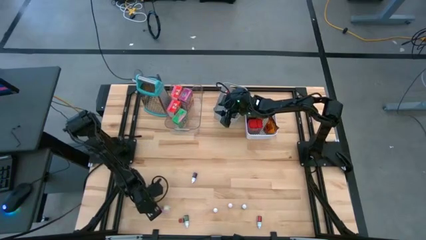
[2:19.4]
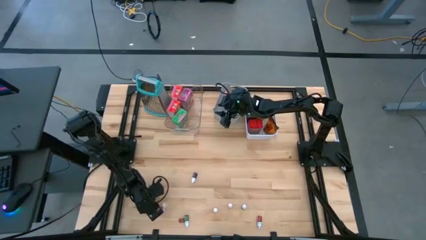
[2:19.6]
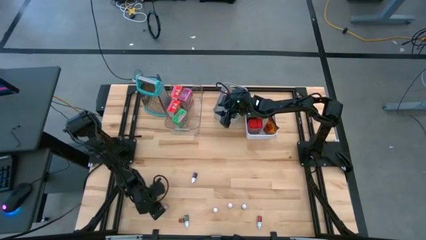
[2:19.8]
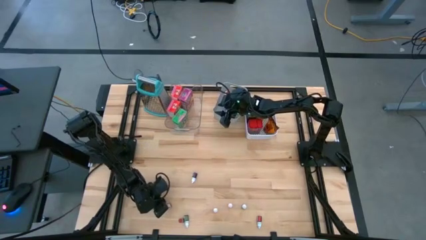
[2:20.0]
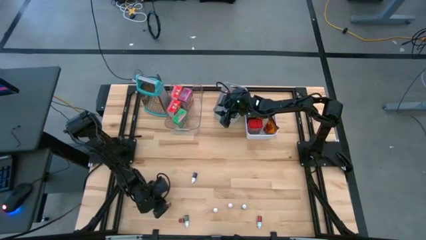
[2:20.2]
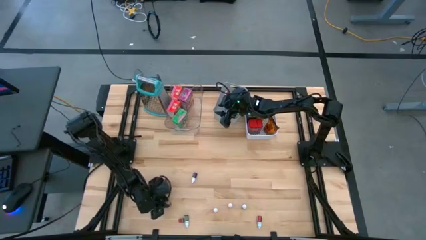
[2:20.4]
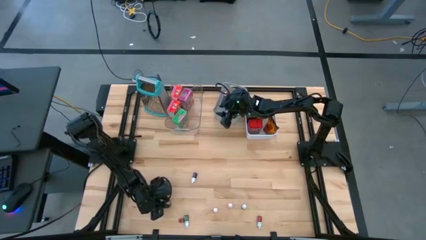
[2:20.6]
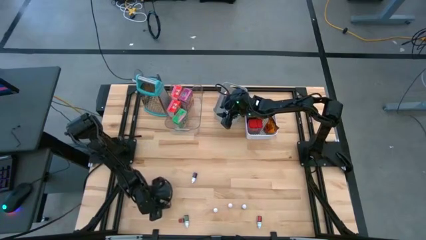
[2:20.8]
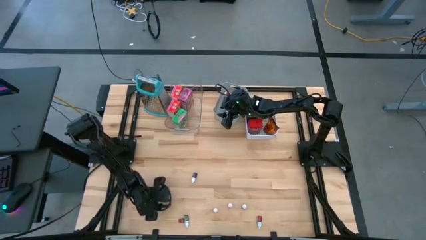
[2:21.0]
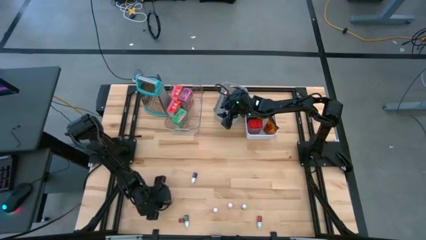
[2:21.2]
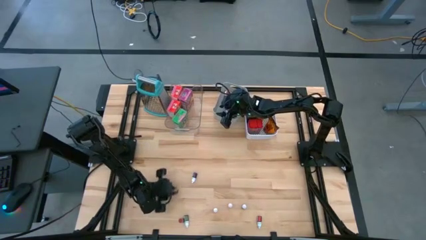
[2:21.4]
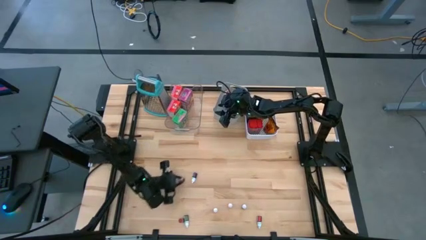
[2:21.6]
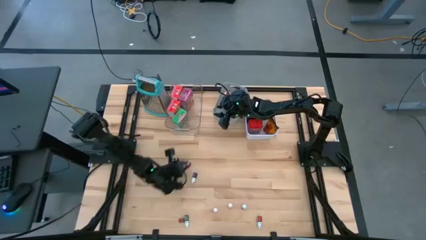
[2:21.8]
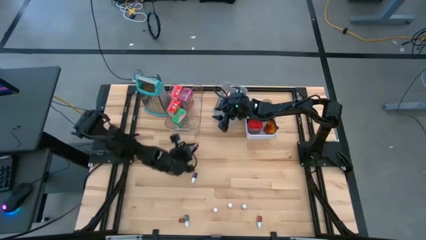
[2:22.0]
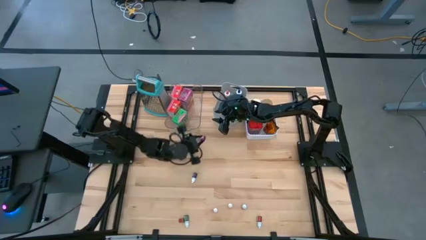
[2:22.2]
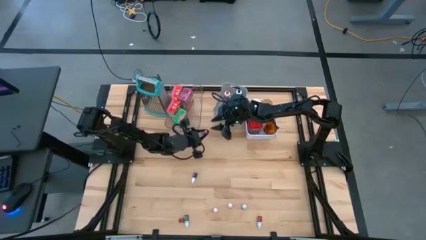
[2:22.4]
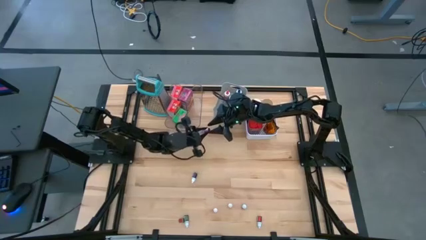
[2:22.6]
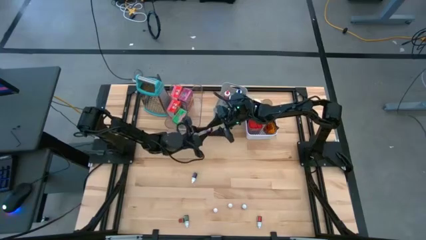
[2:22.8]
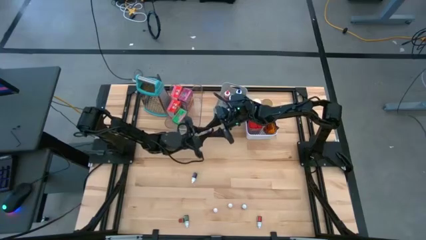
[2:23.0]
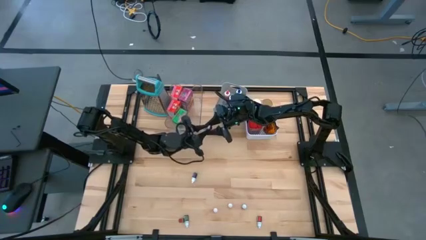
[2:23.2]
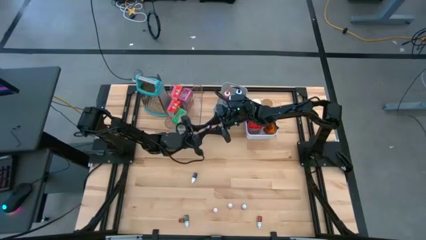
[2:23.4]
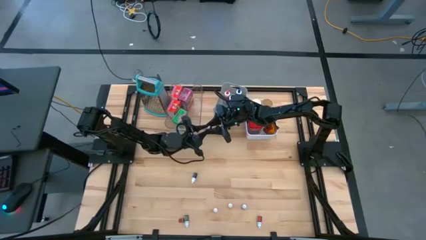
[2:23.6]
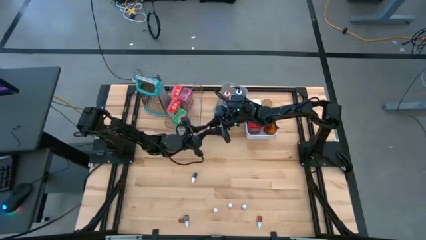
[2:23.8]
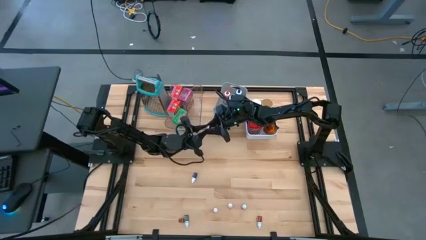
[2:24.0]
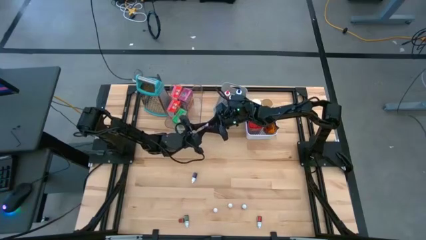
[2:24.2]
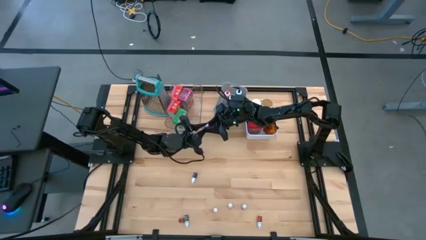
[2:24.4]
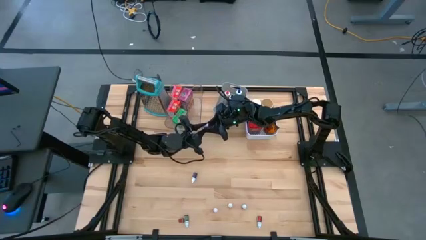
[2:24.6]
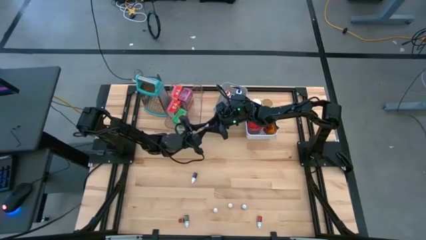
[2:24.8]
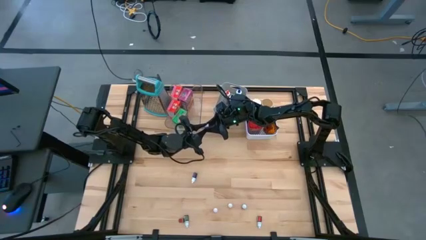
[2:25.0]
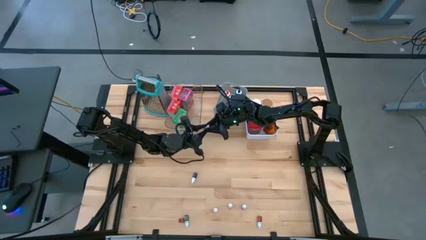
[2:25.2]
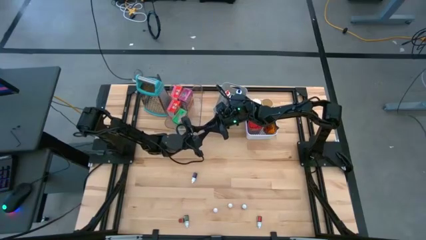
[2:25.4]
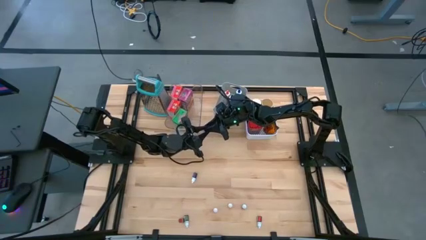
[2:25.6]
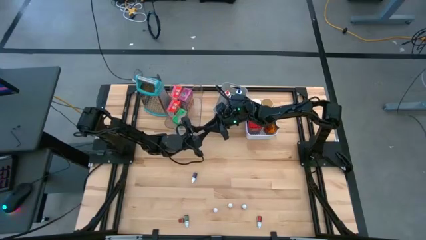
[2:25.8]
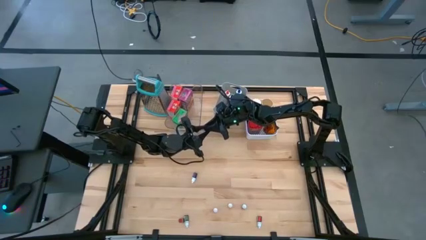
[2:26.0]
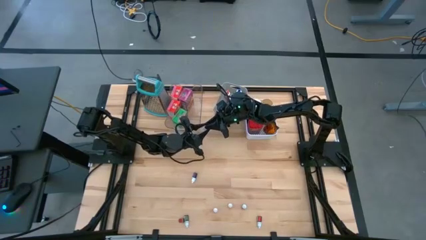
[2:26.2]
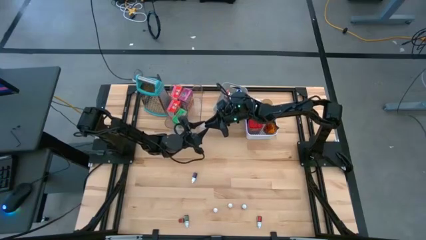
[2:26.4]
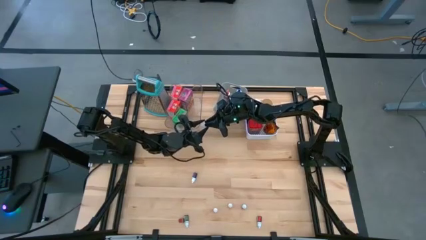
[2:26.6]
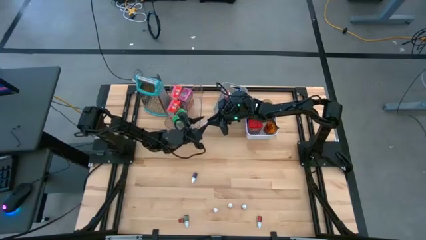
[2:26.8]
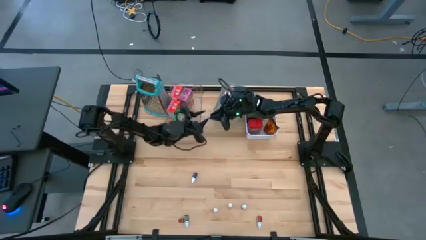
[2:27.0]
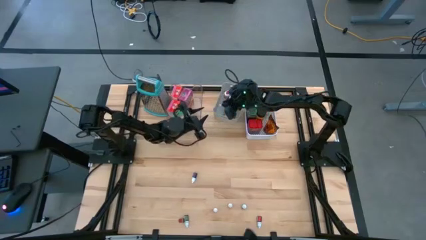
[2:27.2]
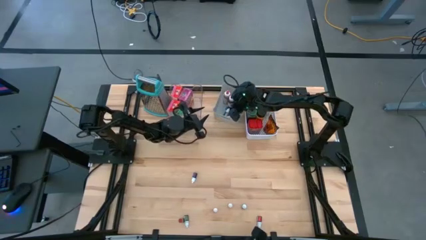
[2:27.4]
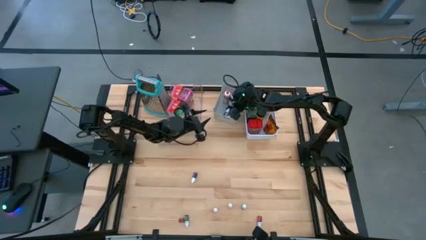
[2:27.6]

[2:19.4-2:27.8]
Task: Pick & Place Kitchen Items
Put the small pink food coloring bottle into the gray bin

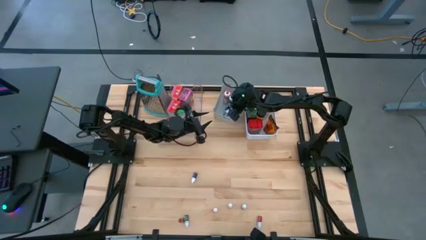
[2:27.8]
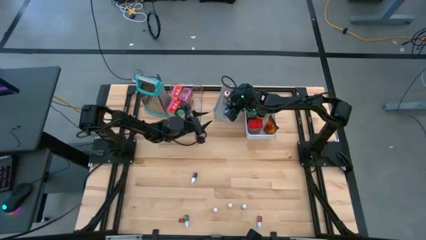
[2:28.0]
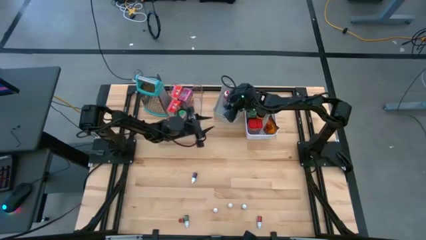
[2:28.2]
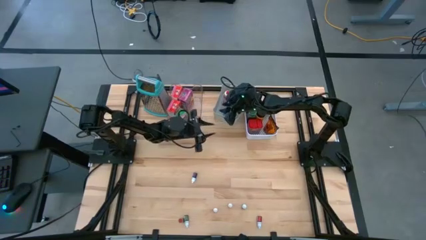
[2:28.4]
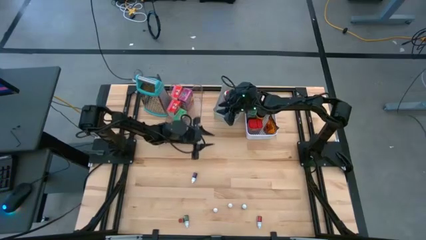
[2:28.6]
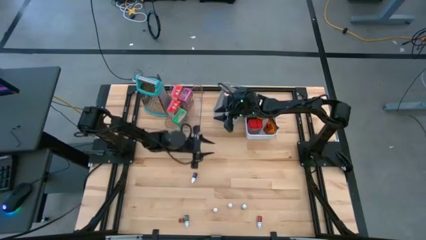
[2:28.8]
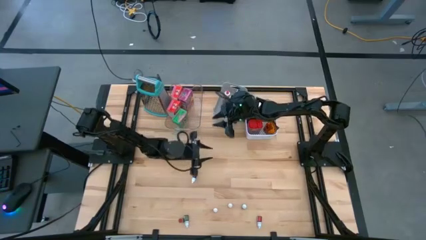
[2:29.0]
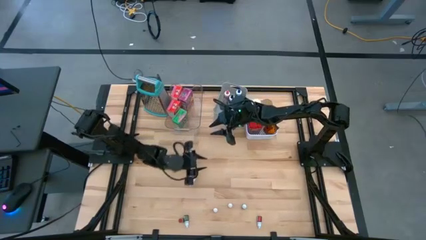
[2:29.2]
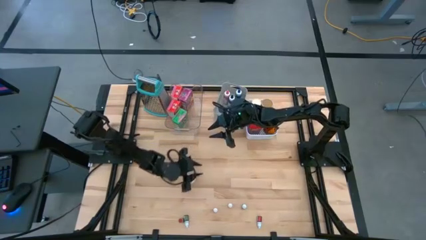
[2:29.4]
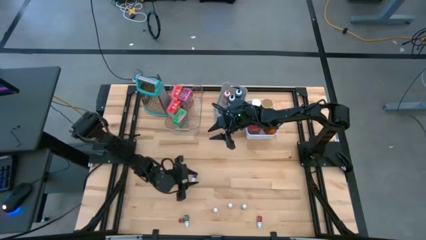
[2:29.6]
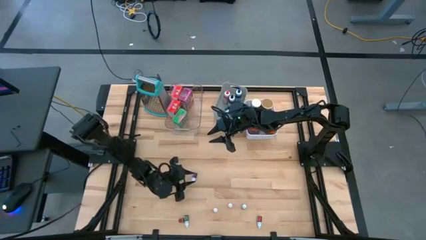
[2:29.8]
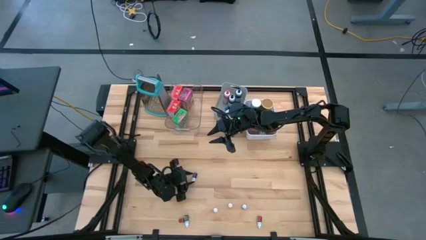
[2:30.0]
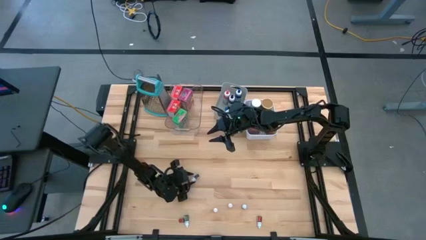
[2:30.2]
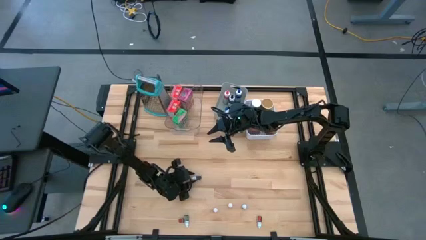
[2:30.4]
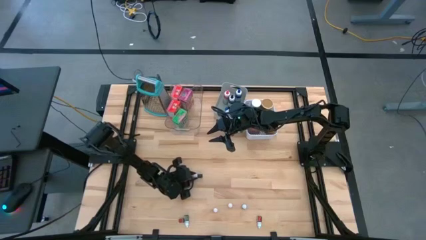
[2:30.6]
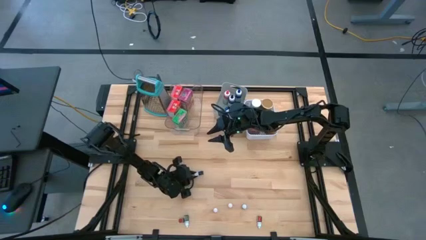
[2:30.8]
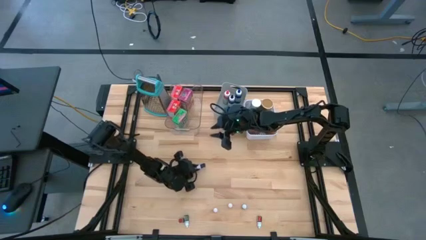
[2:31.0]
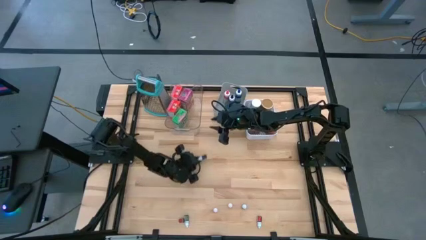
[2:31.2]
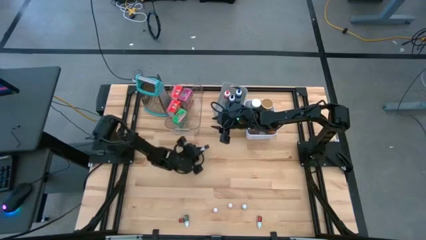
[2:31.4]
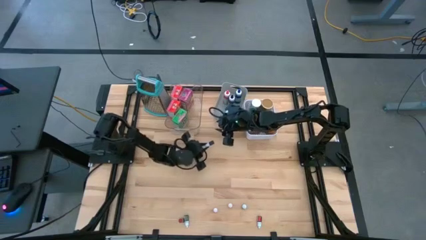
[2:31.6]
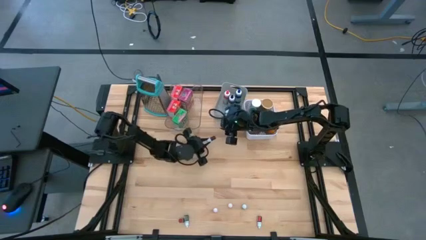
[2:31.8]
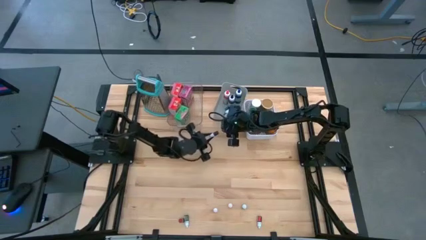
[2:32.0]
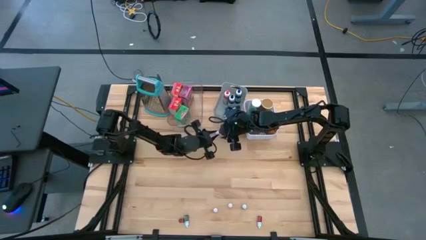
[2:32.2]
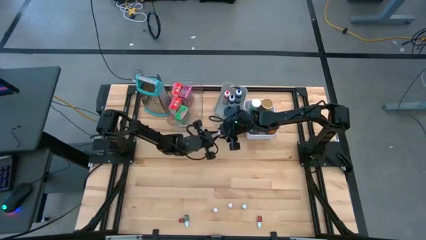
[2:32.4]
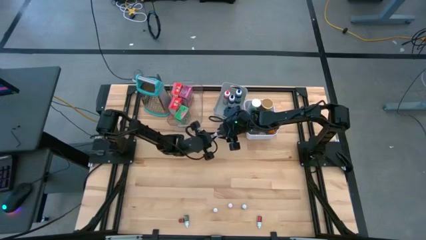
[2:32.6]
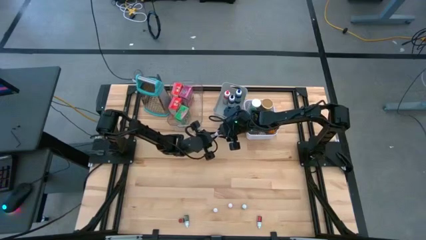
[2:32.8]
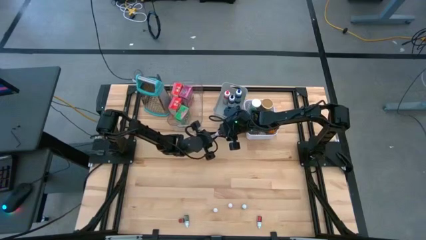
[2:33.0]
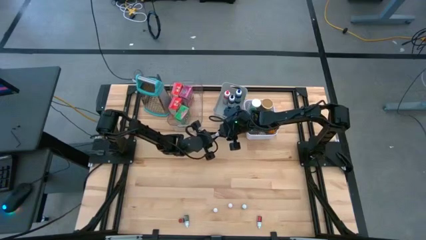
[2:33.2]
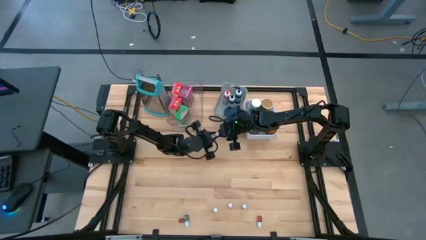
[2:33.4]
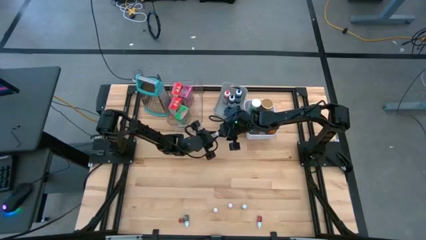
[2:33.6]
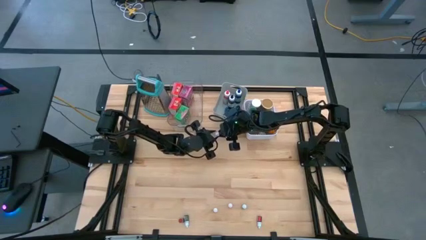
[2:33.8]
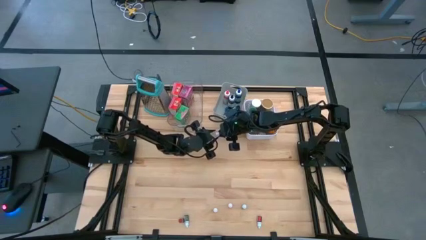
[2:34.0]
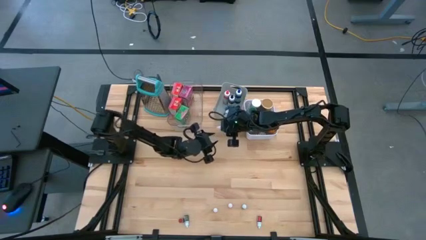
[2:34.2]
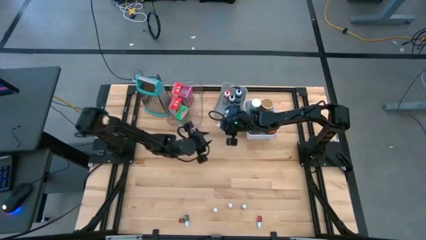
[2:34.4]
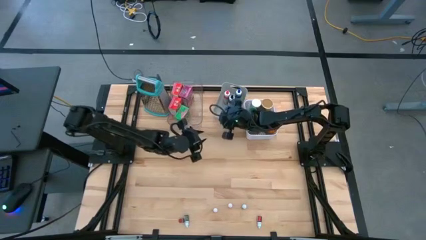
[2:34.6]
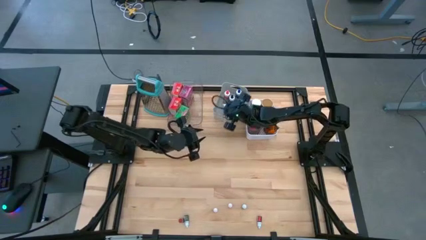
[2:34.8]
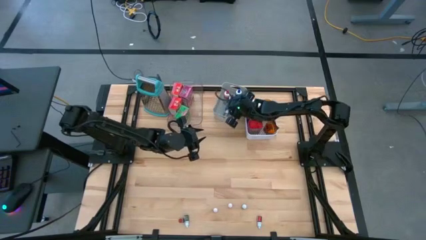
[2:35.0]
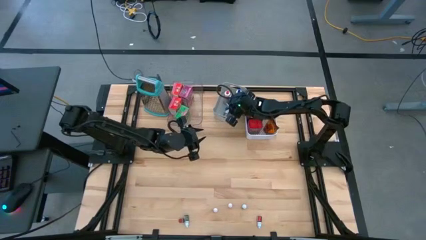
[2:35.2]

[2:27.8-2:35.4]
Put the small purple food coloring bottle into the gray bin
